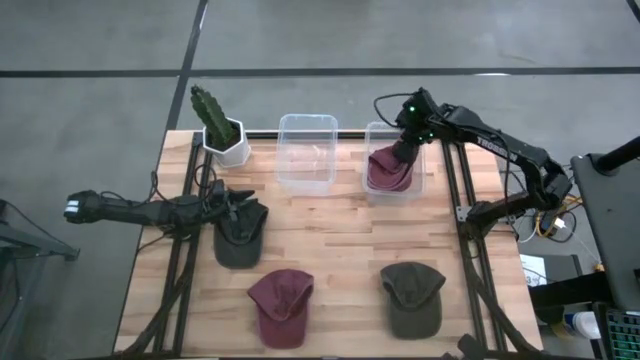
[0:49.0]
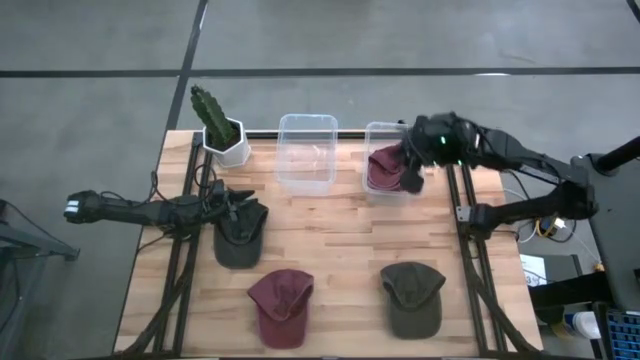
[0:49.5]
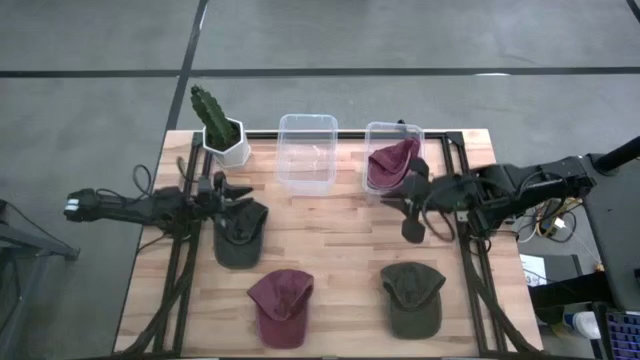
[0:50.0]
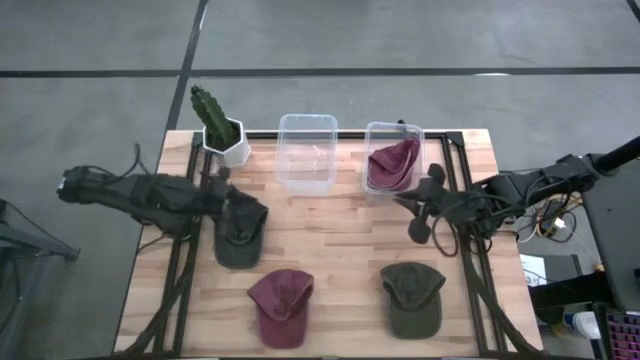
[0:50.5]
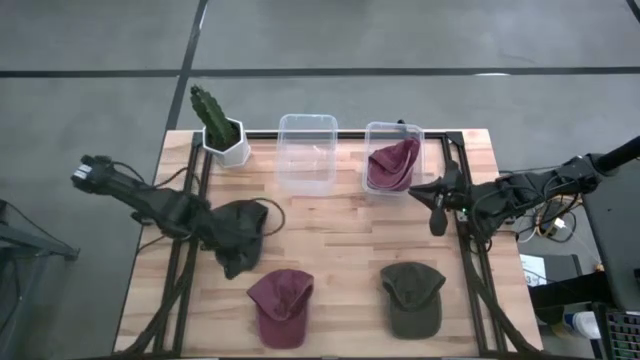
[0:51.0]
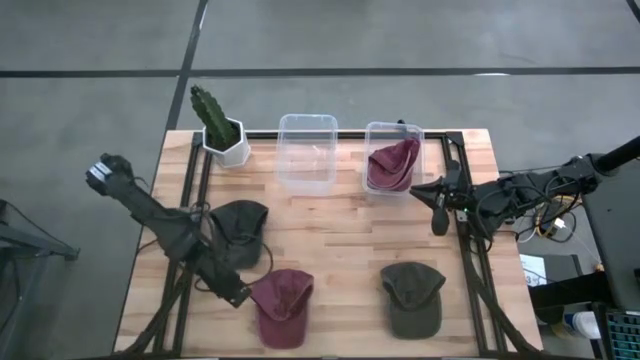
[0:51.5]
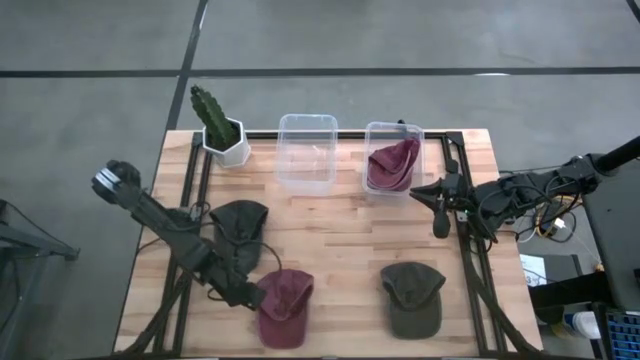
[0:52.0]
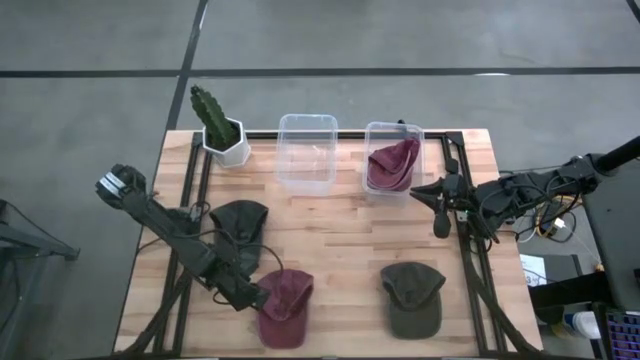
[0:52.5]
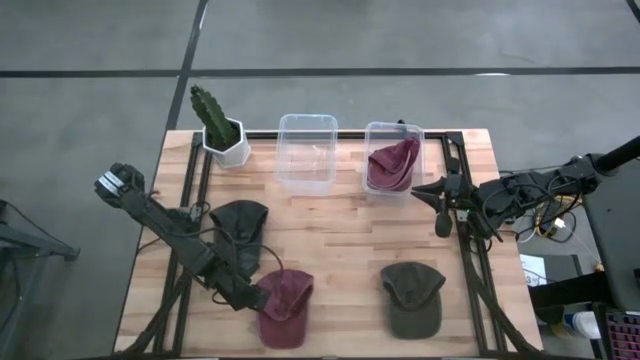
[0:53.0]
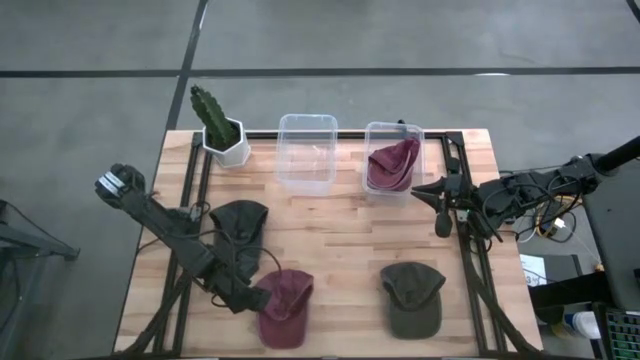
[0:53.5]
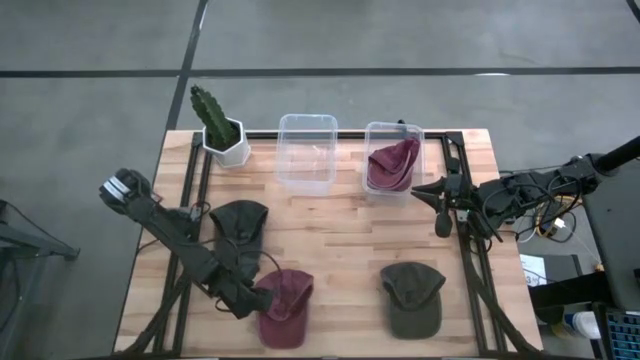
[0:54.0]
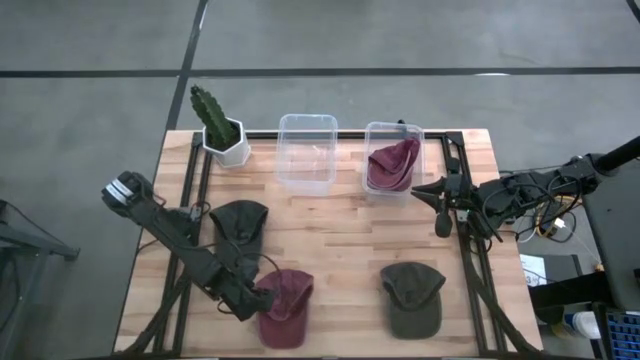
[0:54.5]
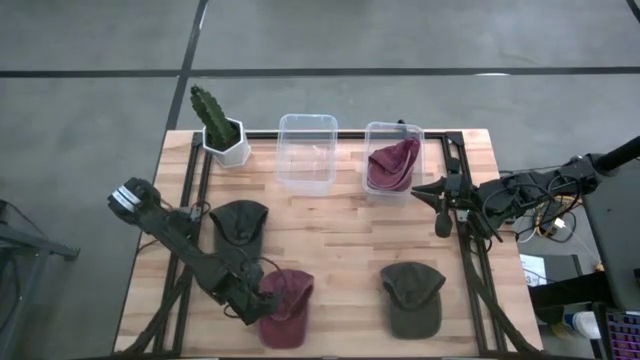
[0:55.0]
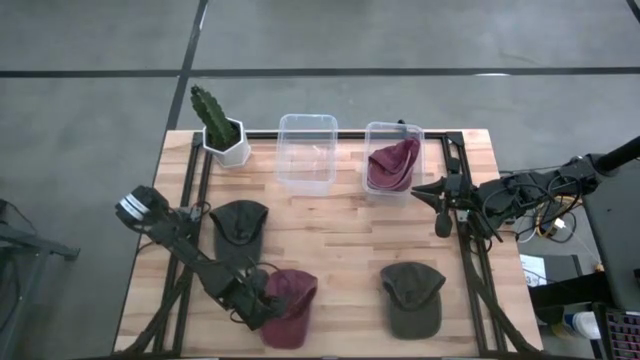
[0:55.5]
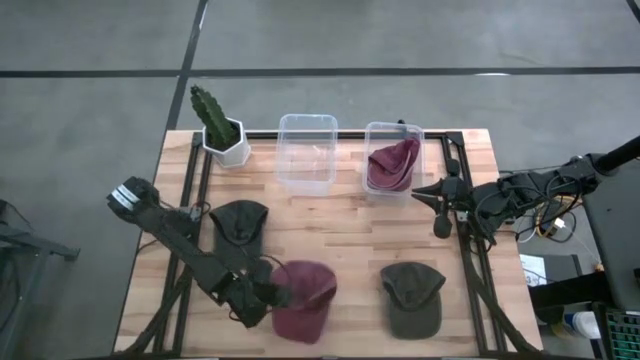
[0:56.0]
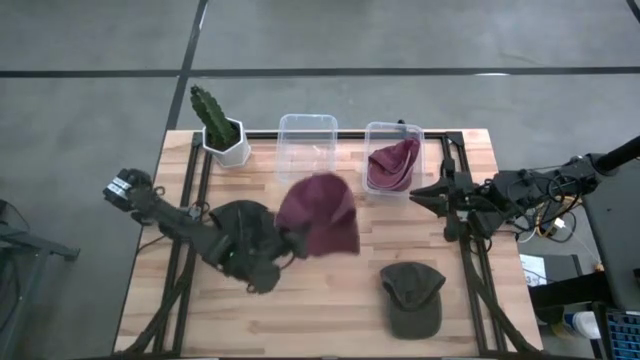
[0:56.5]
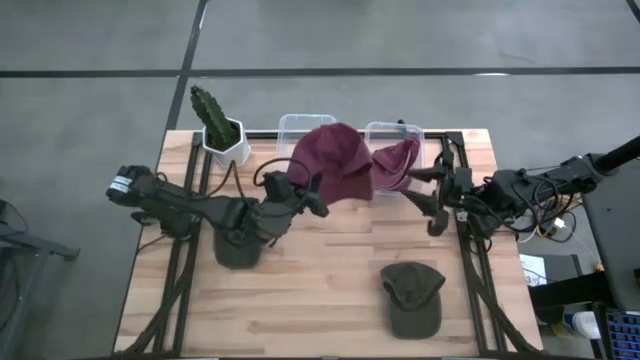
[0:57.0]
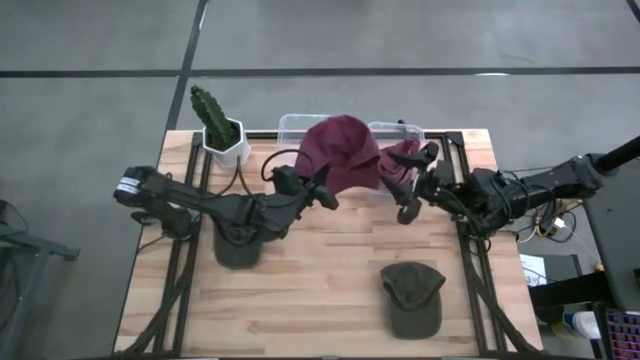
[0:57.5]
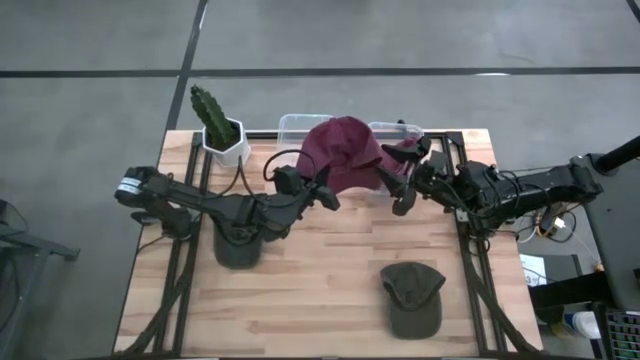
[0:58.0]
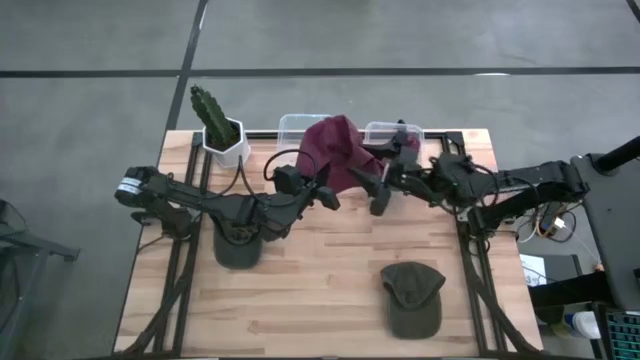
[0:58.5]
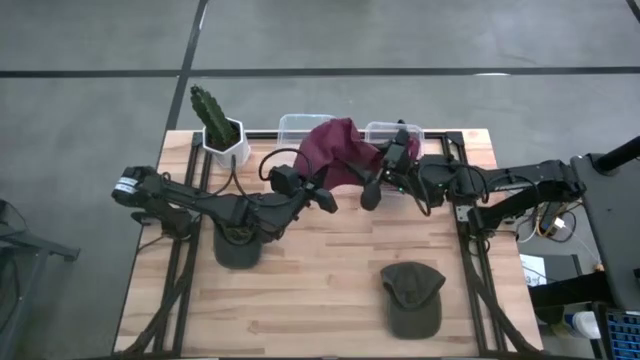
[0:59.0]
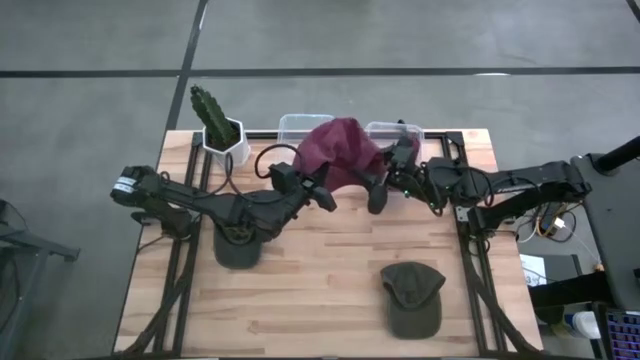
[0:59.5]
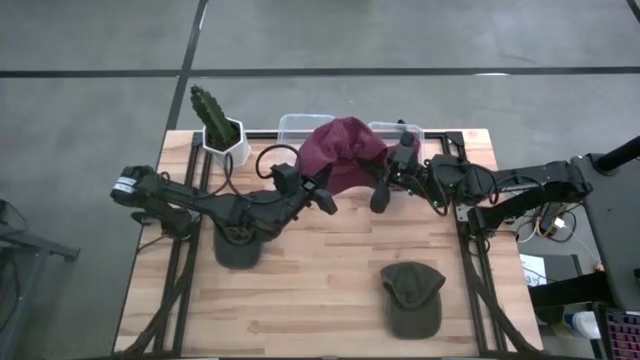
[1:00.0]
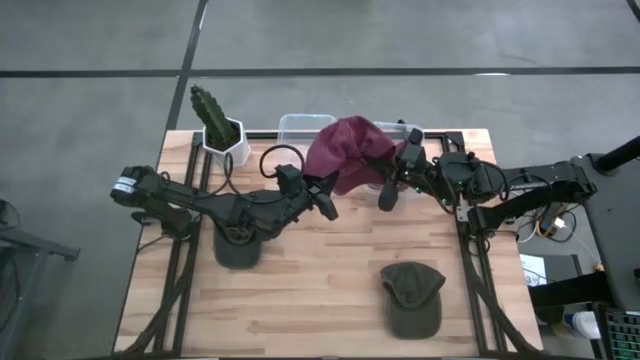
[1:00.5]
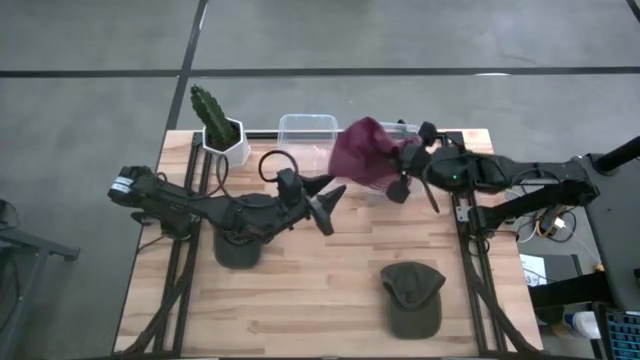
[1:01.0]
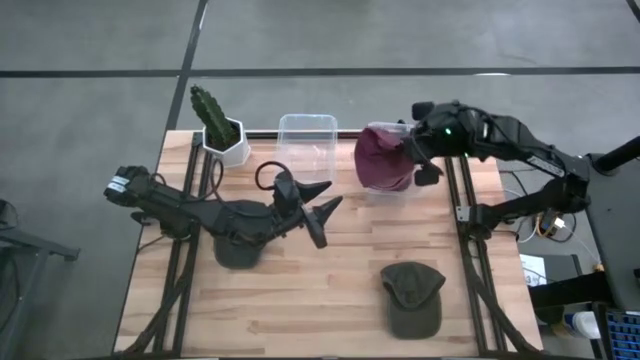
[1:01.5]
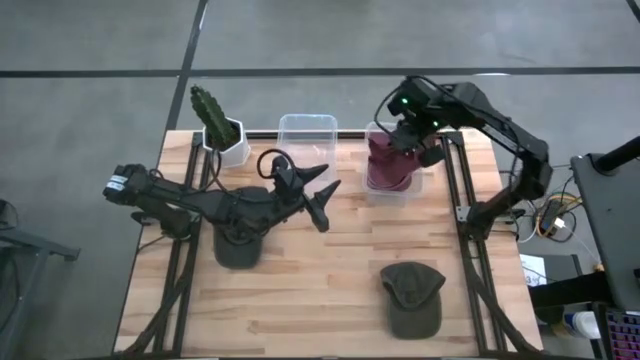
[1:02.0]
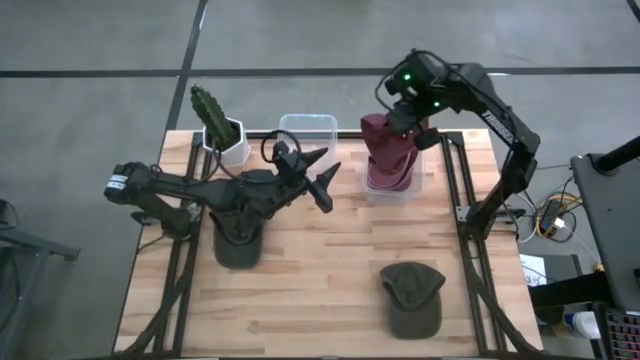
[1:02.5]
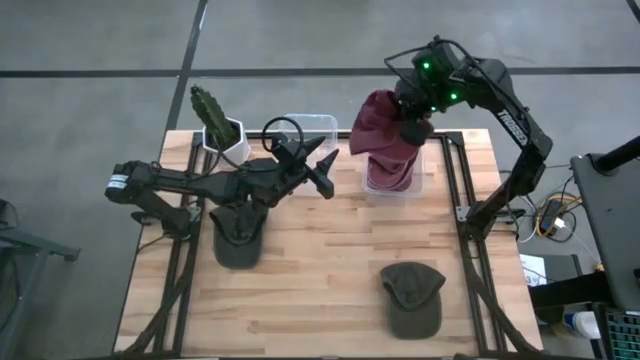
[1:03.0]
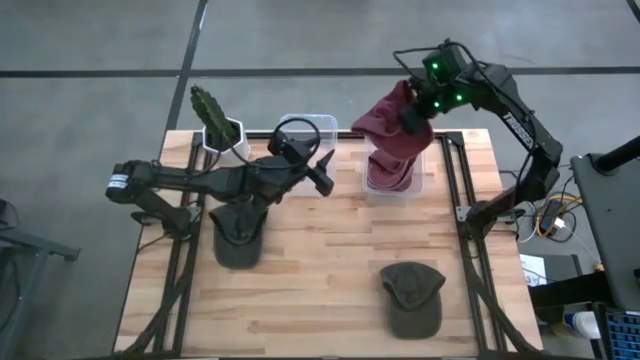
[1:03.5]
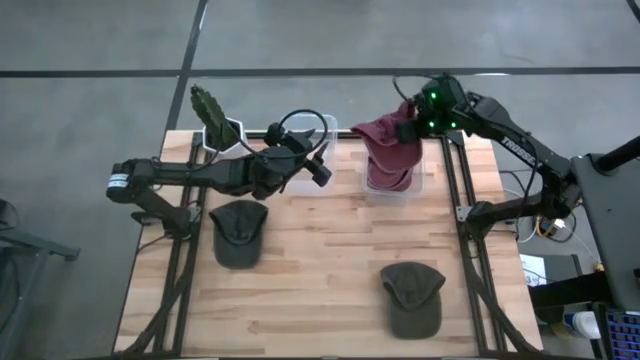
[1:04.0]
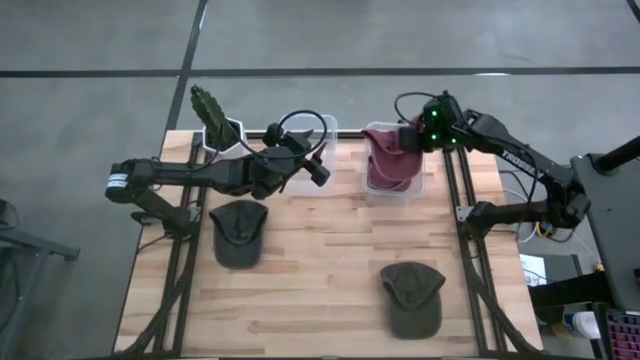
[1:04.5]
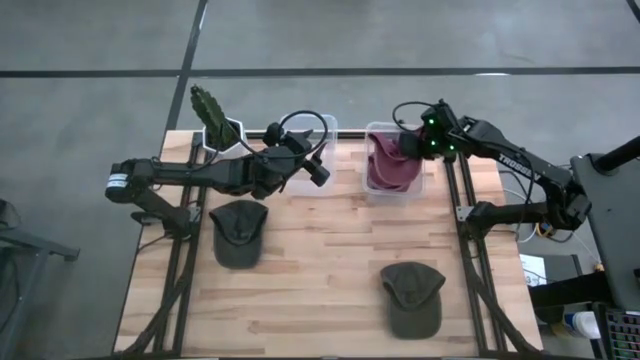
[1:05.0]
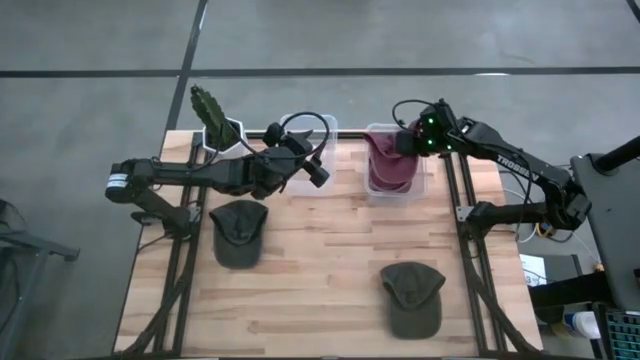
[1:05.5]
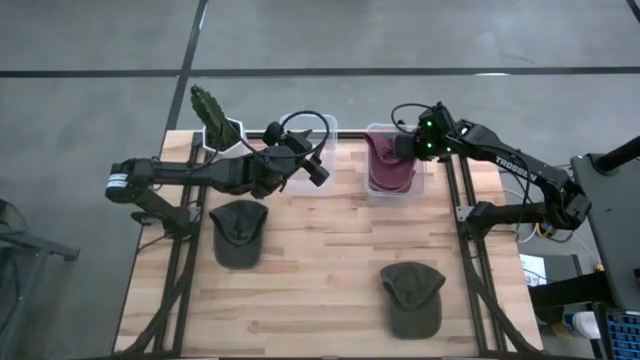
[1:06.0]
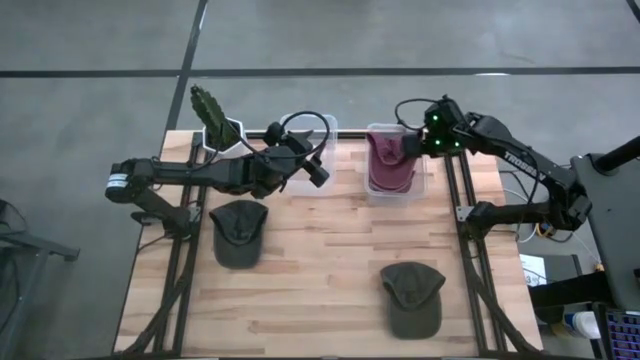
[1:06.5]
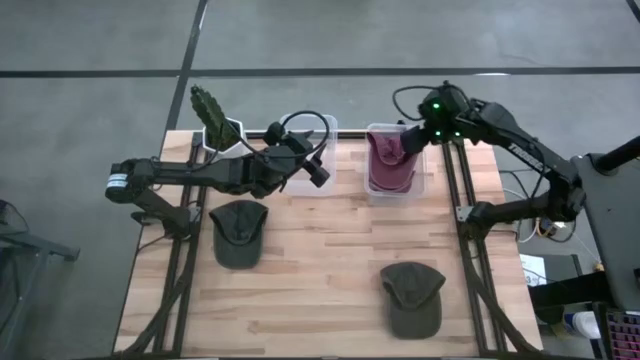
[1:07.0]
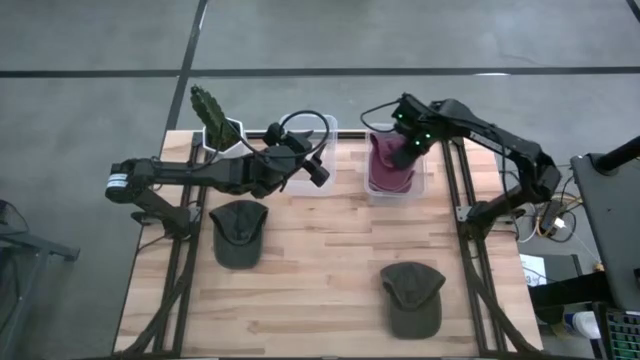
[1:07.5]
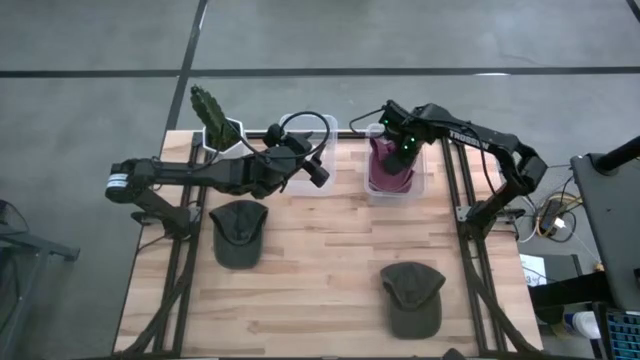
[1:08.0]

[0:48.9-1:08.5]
Task: Pick & Place hat
Put the red cap into the right transparent bin

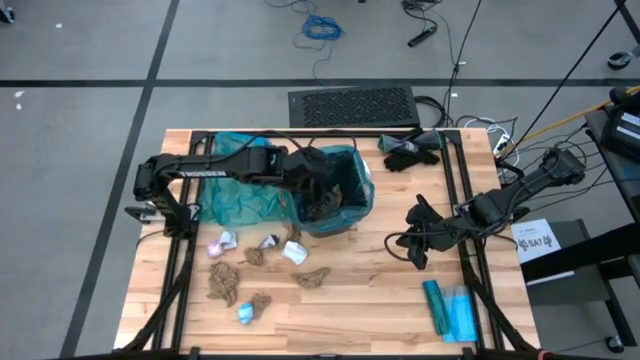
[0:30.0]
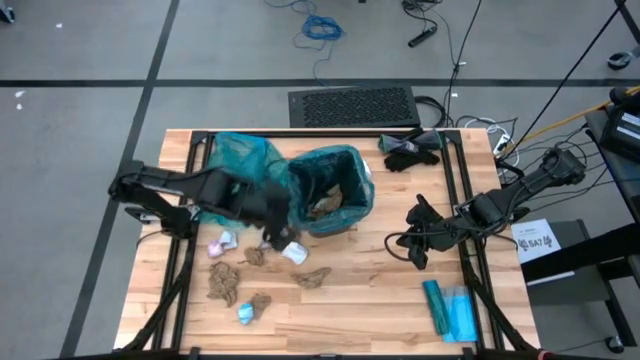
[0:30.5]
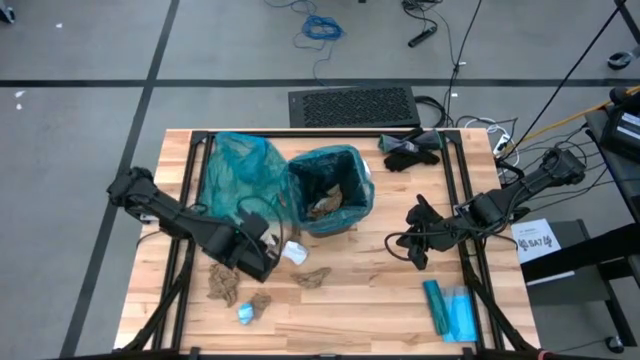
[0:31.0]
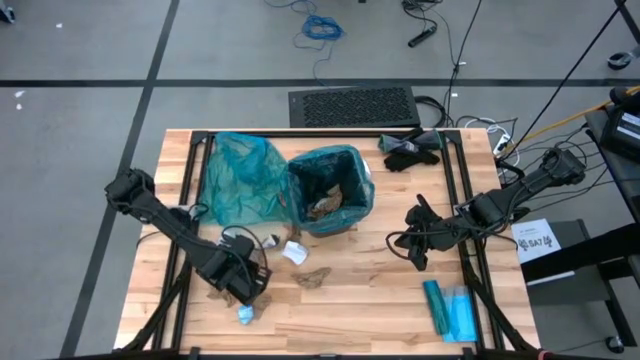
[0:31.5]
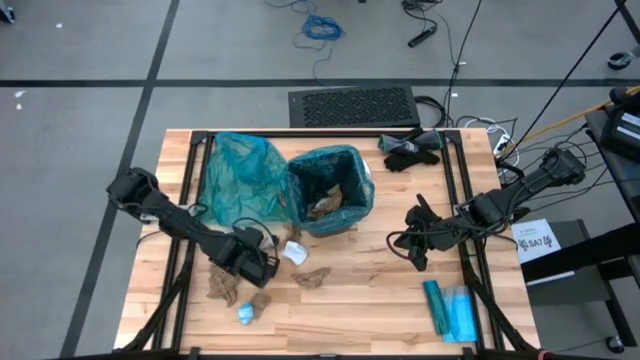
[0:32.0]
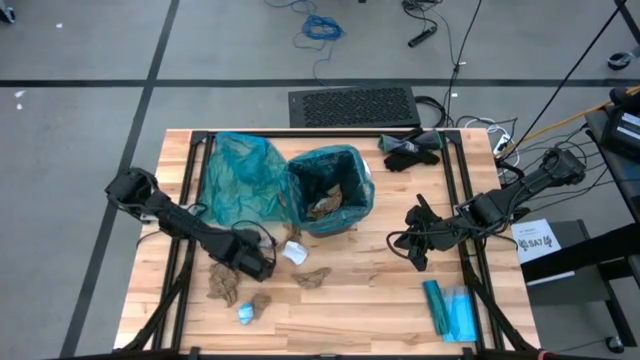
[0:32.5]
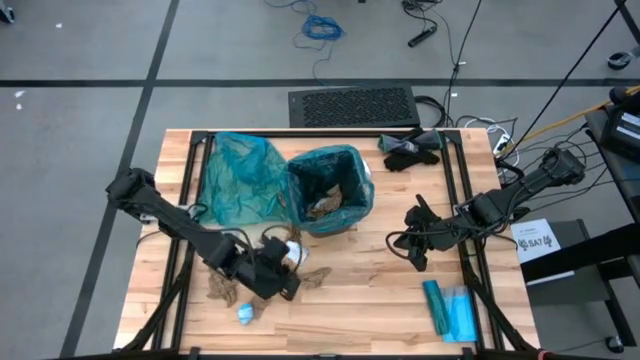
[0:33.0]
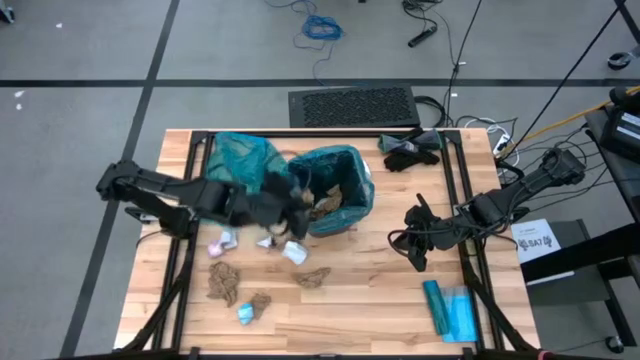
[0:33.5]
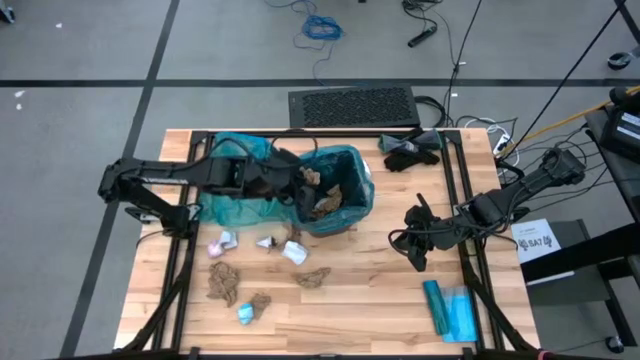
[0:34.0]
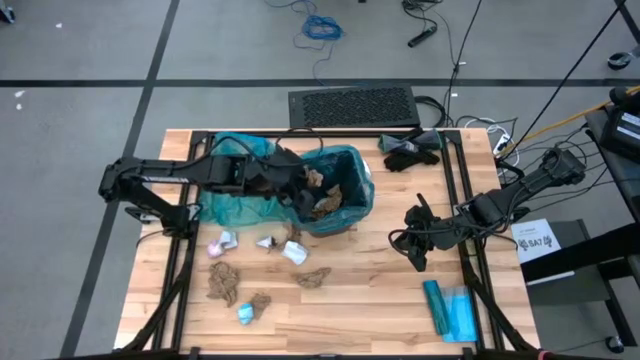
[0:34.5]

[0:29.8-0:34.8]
Task: place trash/remove bag and relplace
Put the brown napkin into the trash bin
